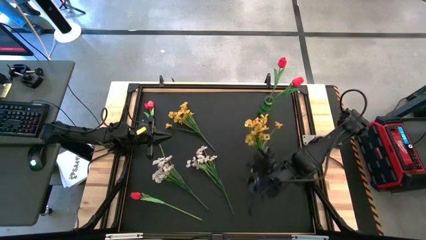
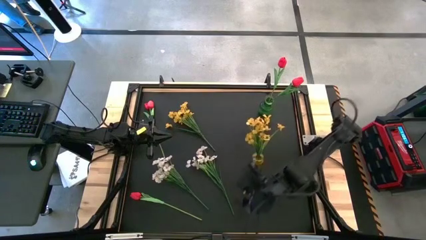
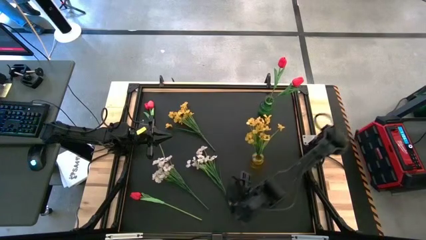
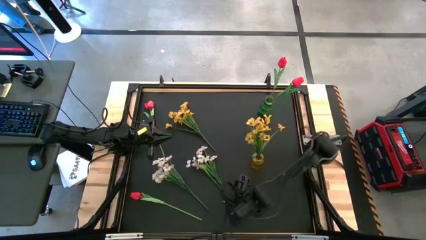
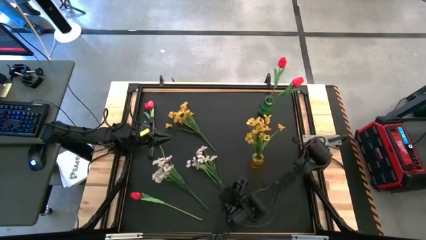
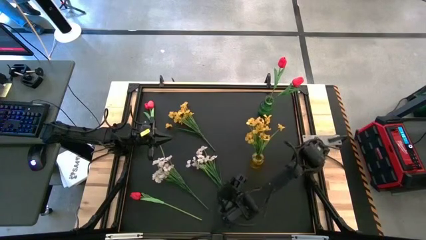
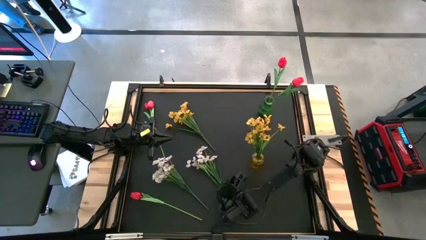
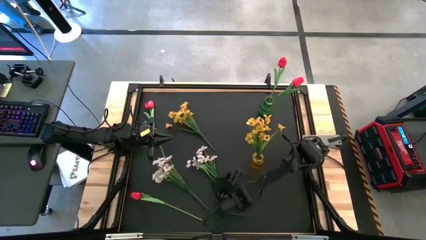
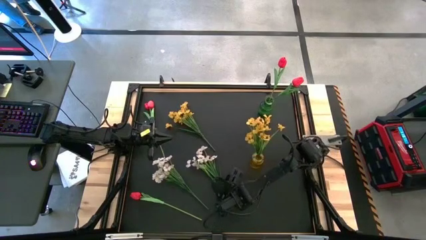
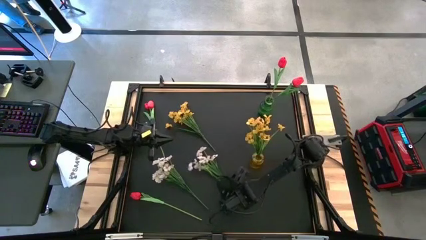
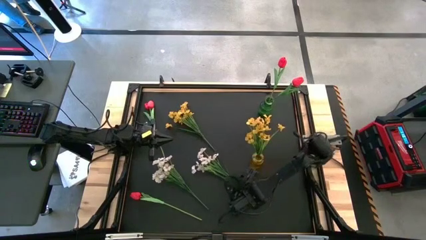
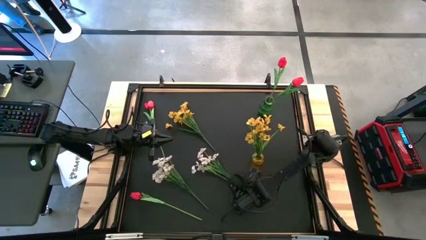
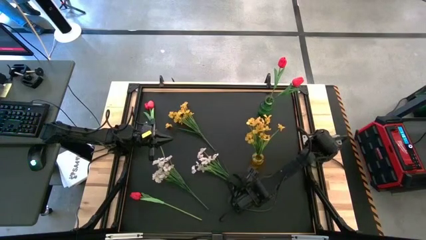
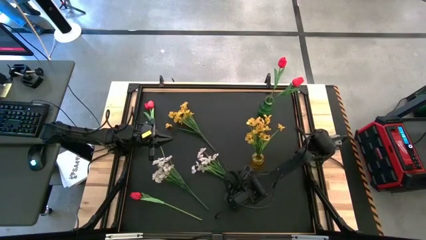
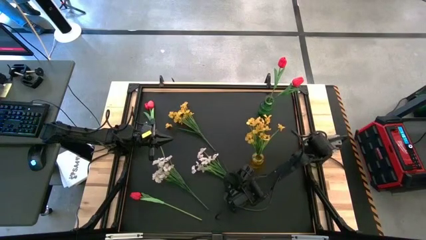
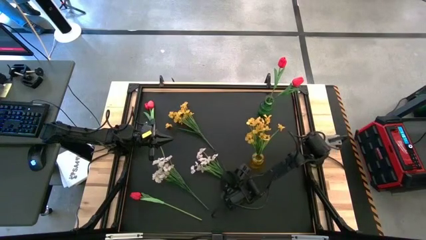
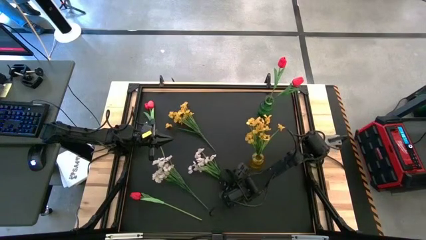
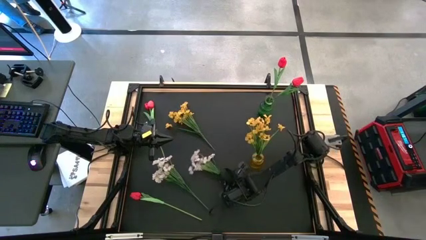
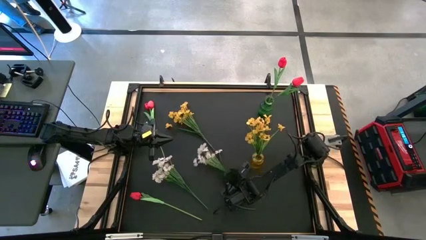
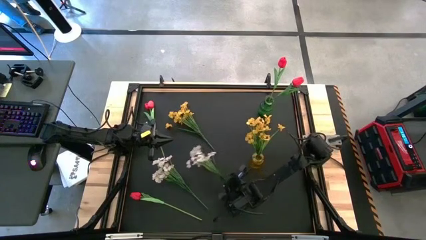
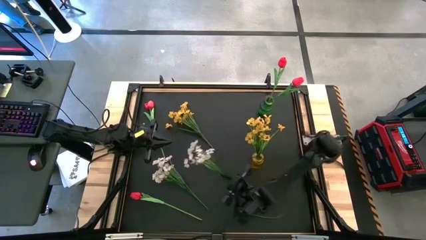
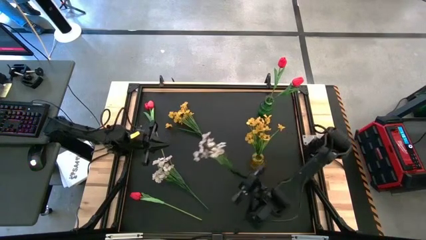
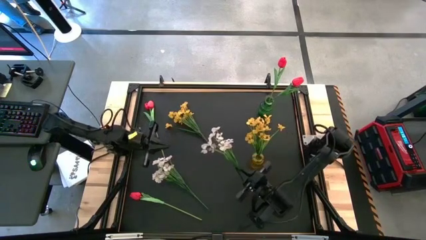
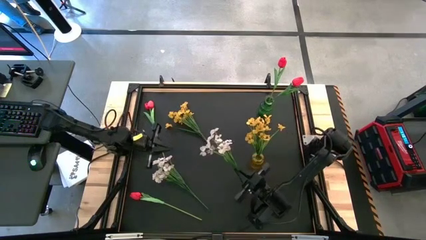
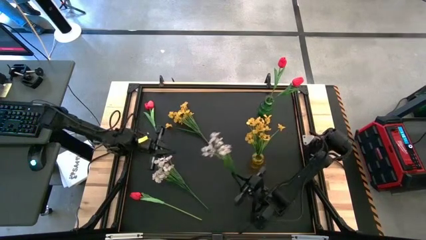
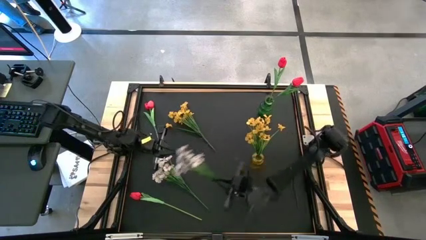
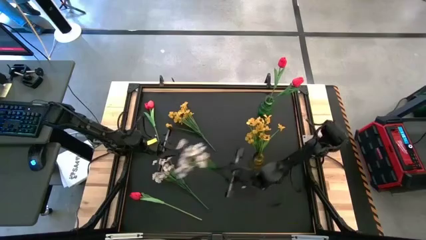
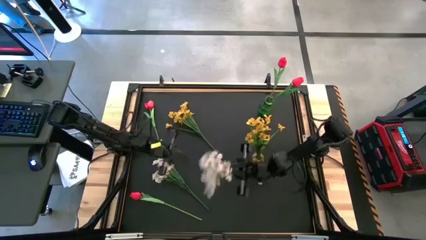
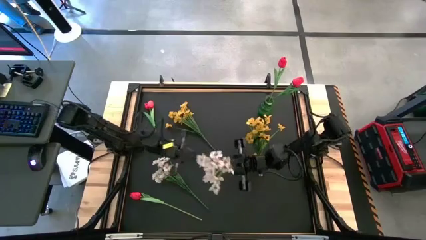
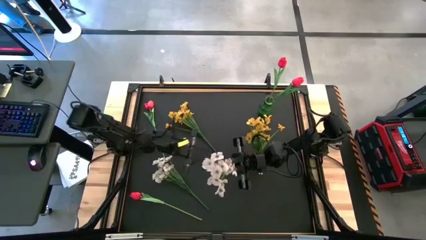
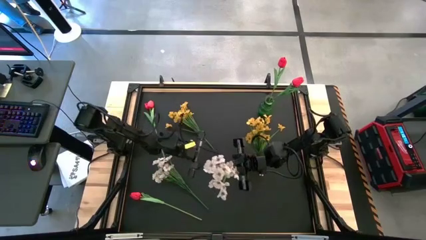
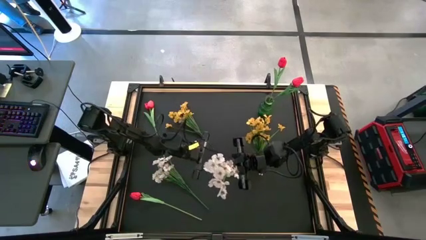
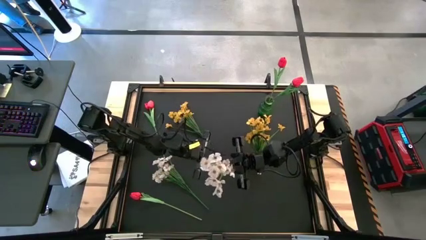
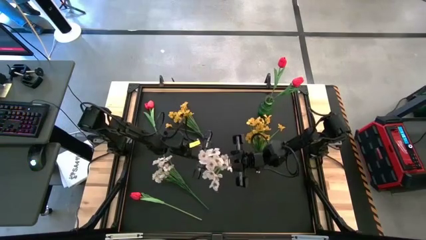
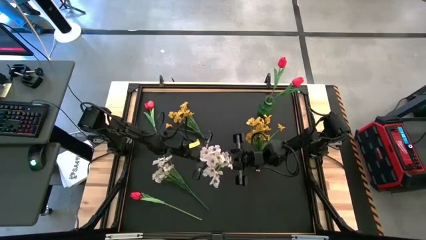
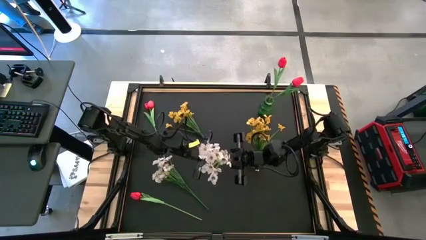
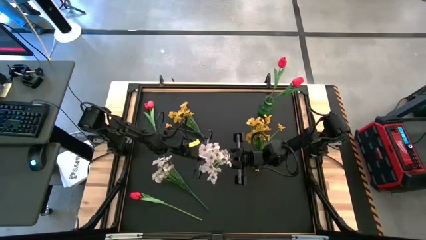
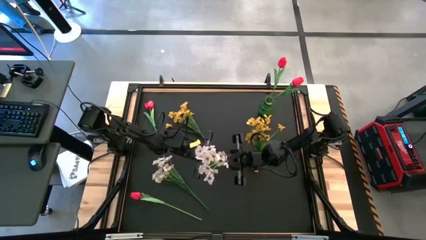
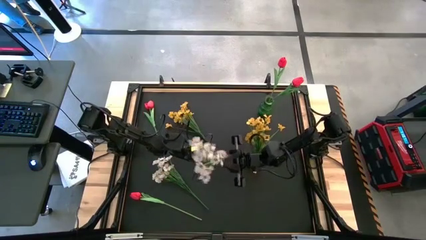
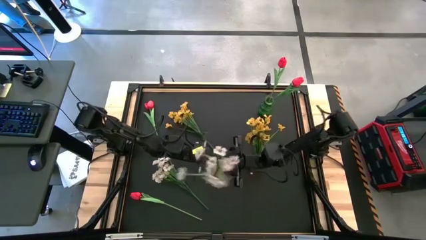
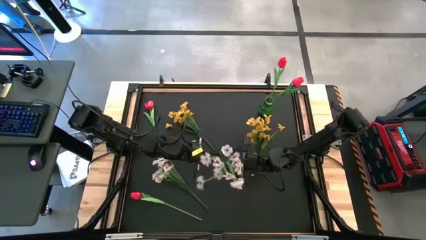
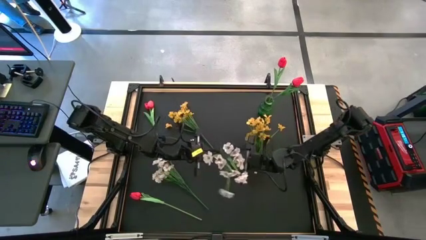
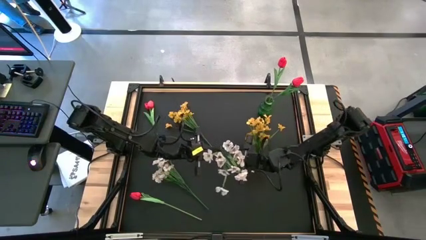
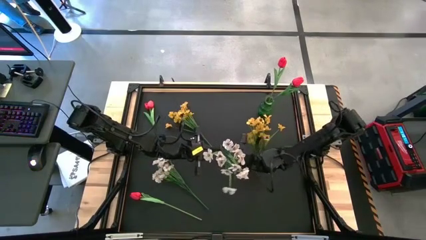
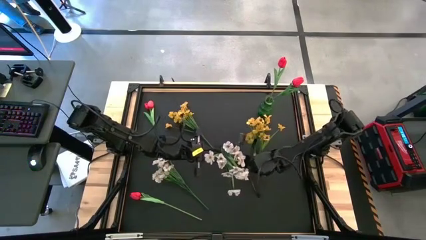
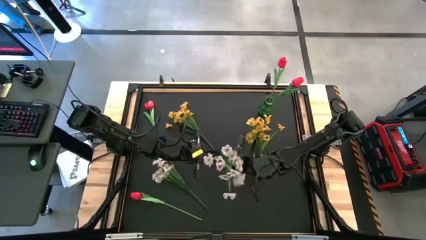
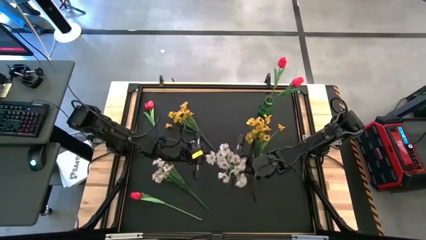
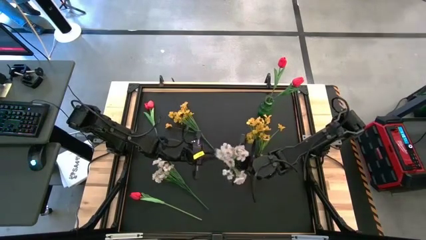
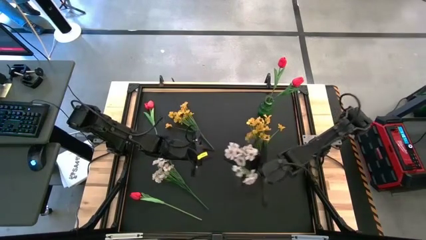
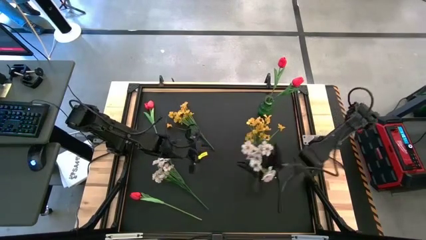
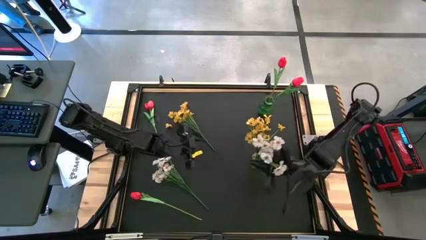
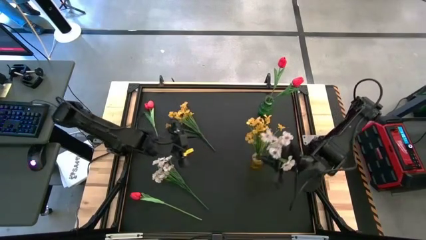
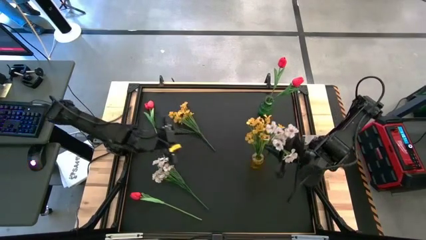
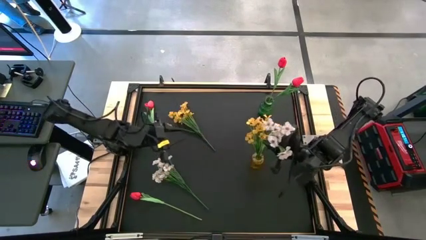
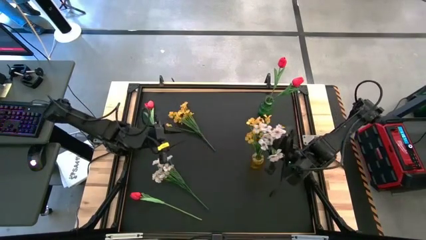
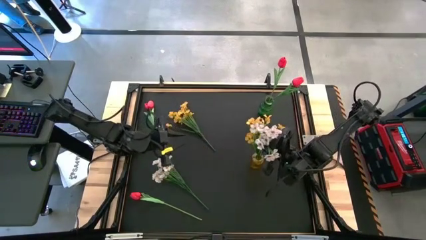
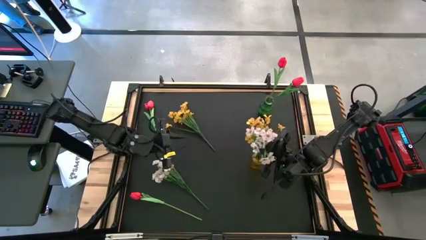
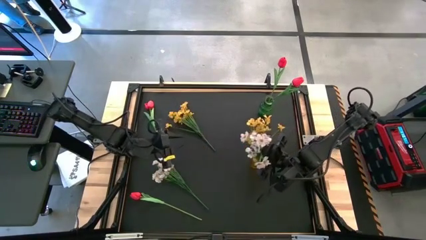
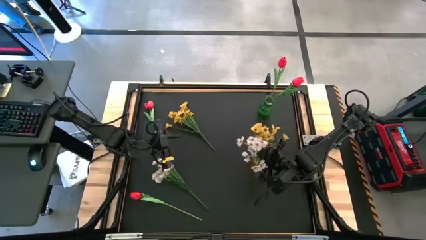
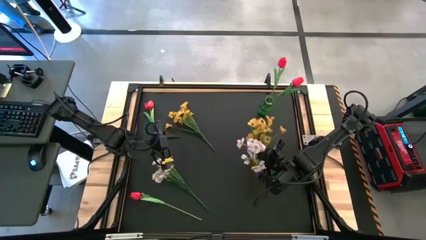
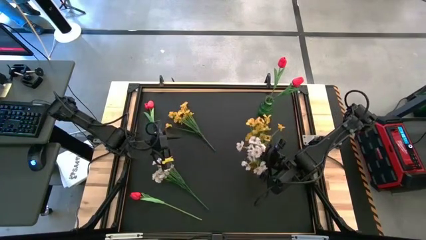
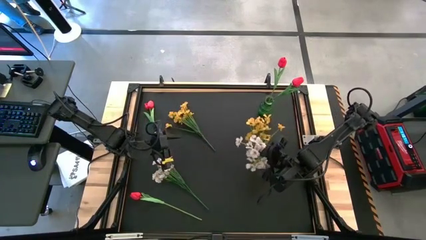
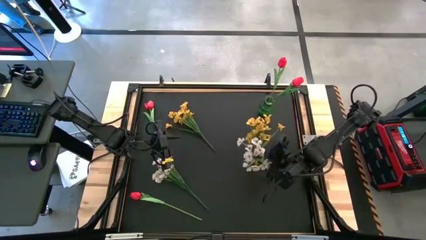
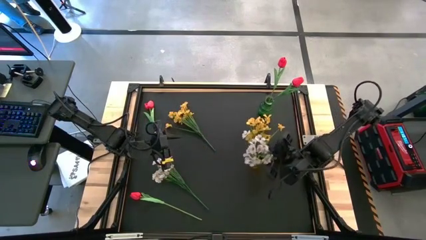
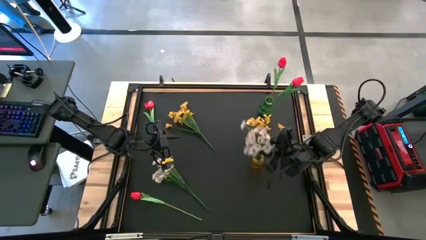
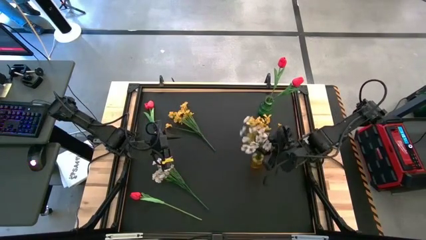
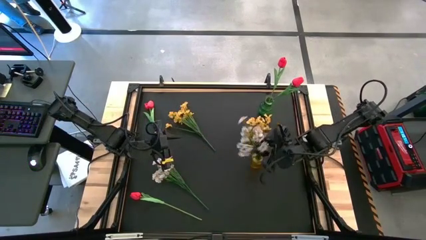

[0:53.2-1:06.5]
Task: Sort flowers into vase by color
Put the right white flowers into the yellow vase
